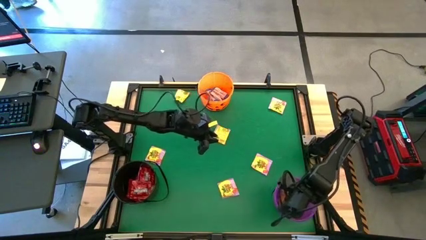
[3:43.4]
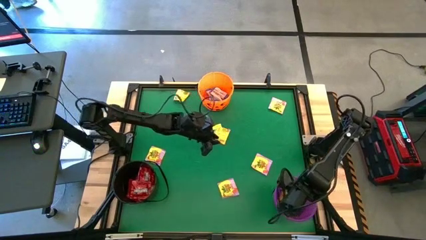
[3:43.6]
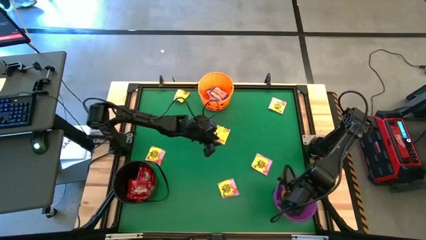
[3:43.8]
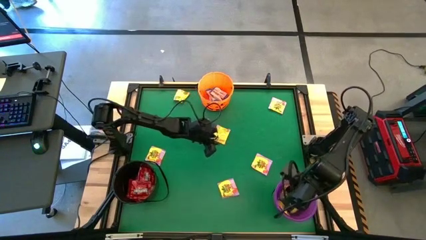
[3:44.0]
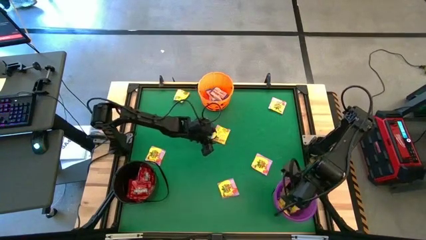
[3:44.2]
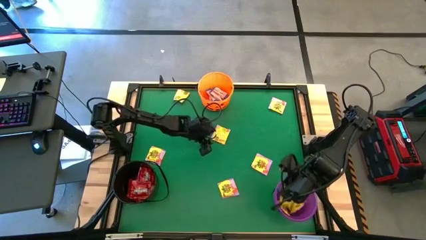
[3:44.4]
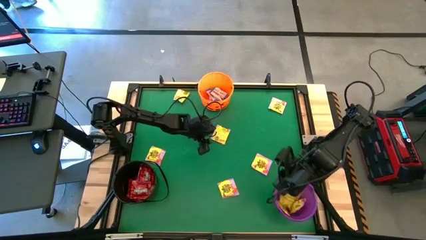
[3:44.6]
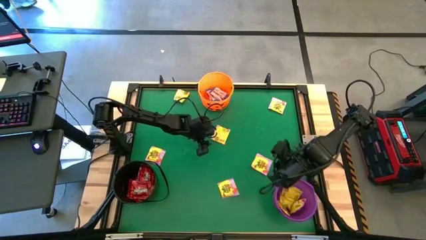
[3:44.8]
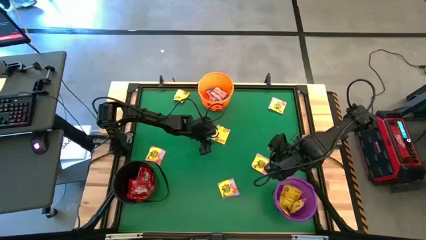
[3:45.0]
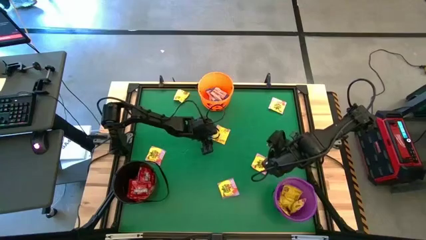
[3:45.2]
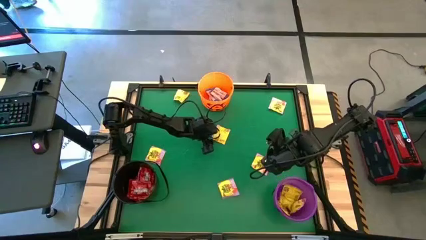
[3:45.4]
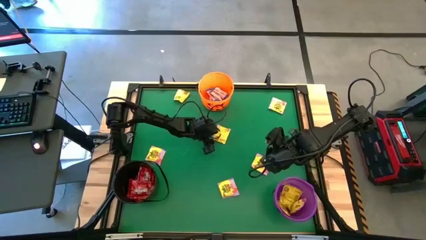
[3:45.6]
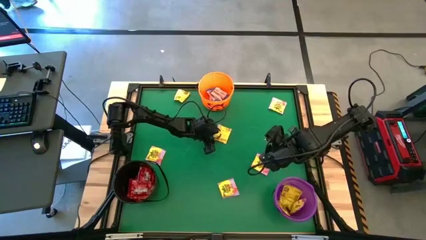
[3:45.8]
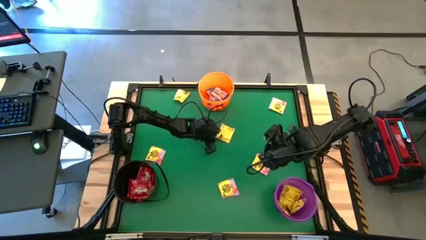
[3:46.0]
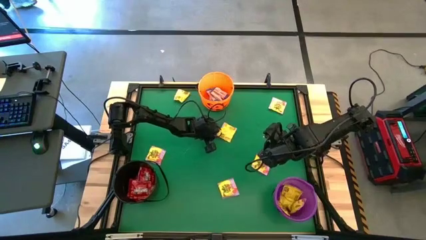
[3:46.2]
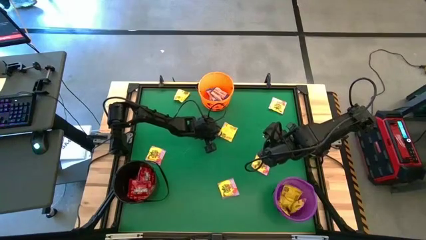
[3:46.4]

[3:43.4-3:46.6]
Task: Sort candy by brand, put in halloween buckets
Put the yellow candy into the purple bucket

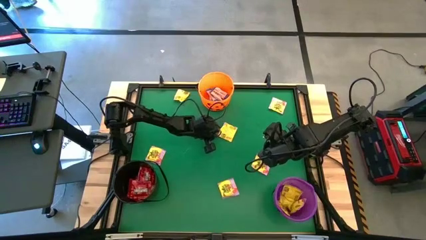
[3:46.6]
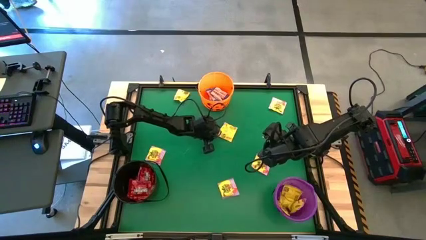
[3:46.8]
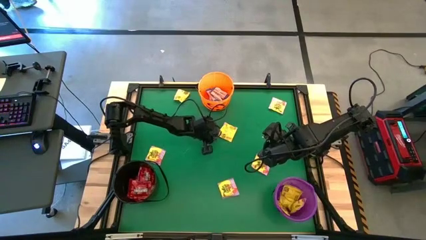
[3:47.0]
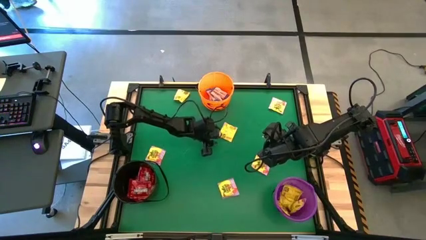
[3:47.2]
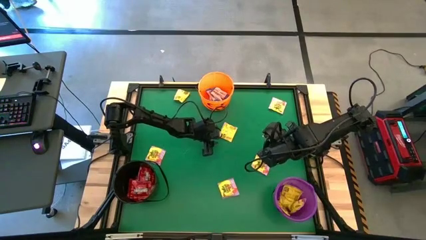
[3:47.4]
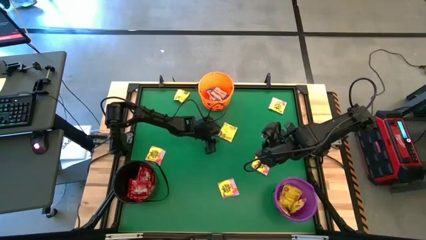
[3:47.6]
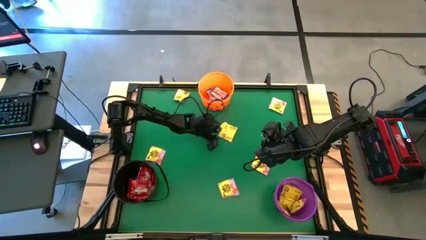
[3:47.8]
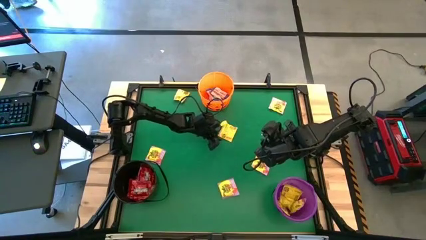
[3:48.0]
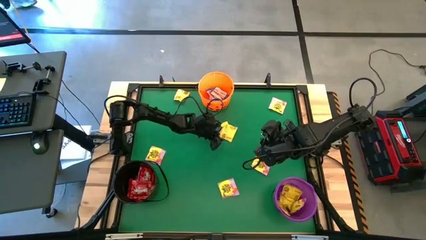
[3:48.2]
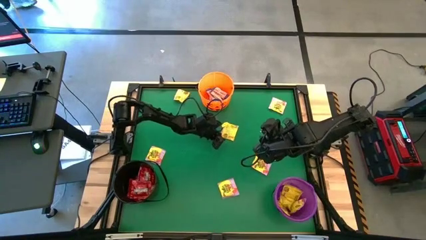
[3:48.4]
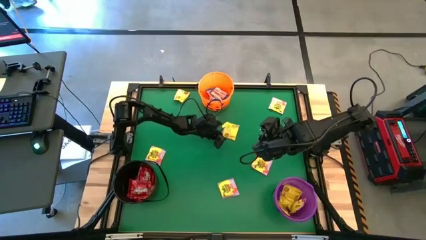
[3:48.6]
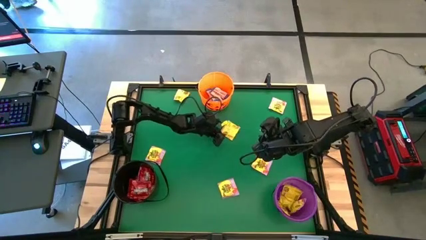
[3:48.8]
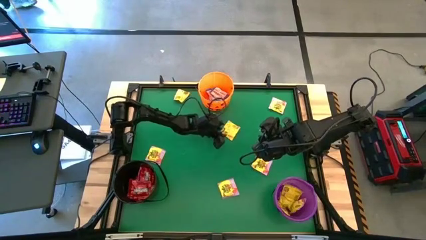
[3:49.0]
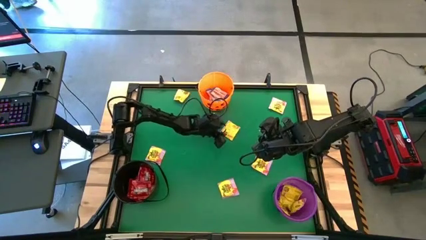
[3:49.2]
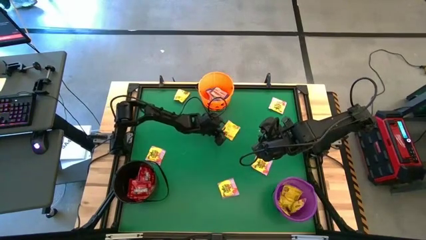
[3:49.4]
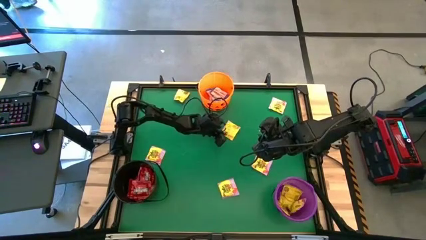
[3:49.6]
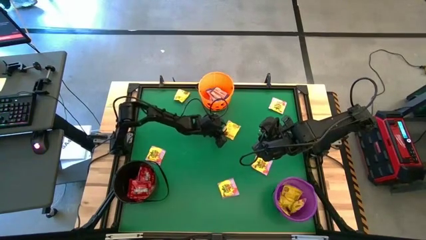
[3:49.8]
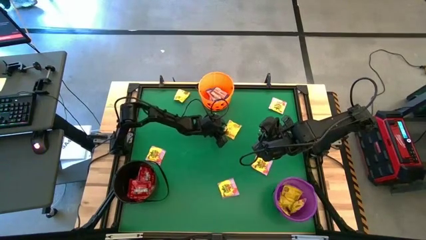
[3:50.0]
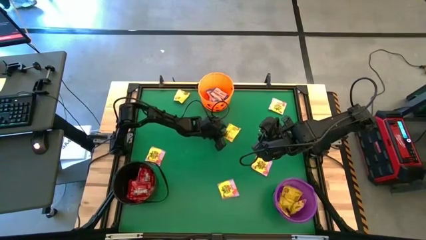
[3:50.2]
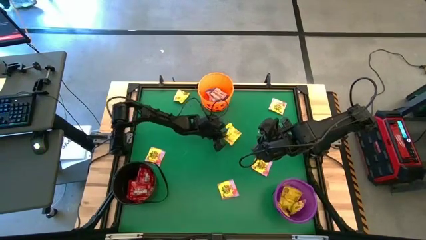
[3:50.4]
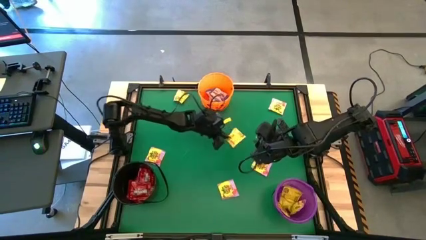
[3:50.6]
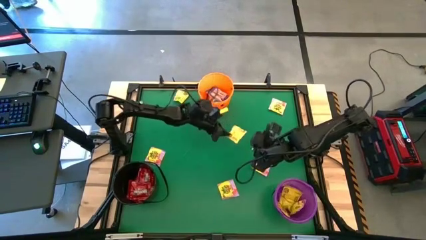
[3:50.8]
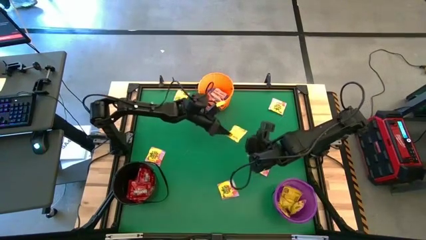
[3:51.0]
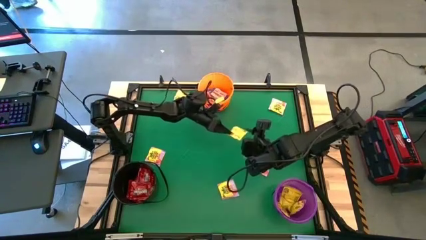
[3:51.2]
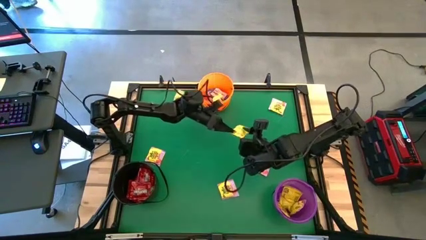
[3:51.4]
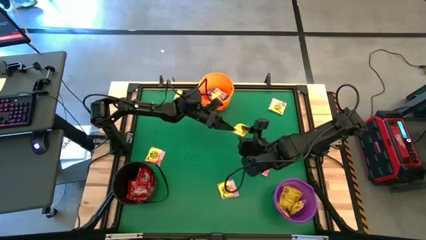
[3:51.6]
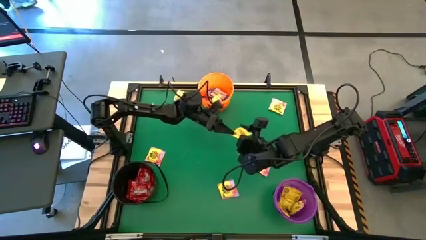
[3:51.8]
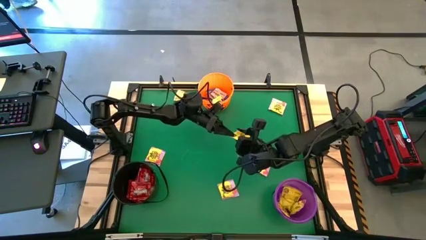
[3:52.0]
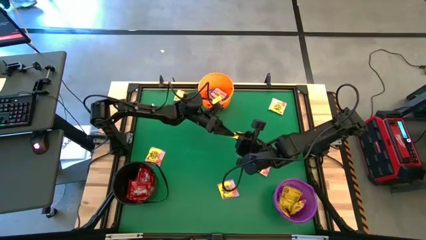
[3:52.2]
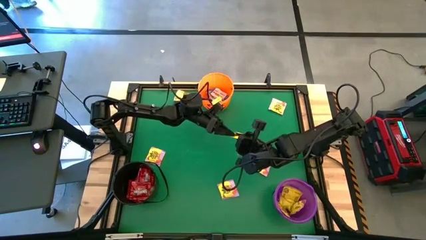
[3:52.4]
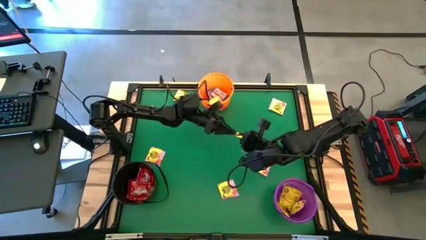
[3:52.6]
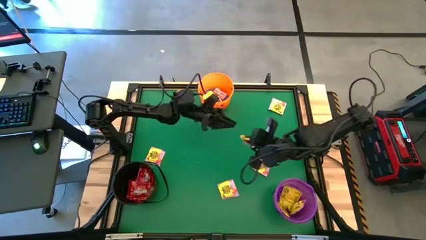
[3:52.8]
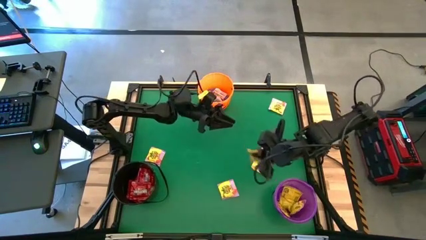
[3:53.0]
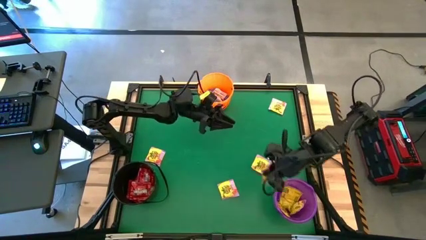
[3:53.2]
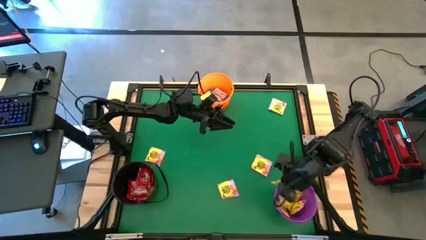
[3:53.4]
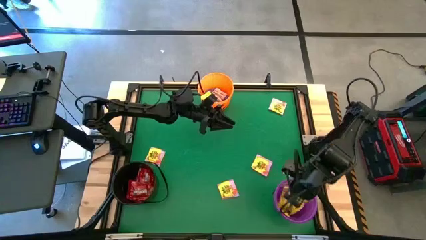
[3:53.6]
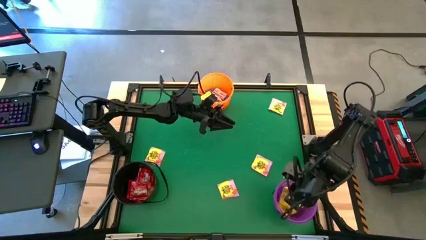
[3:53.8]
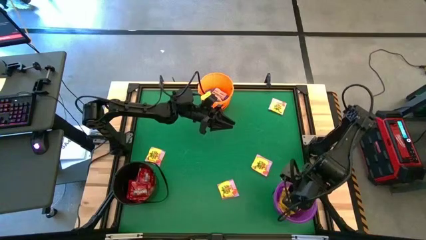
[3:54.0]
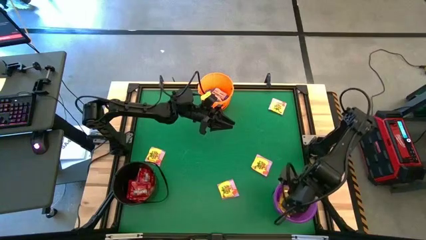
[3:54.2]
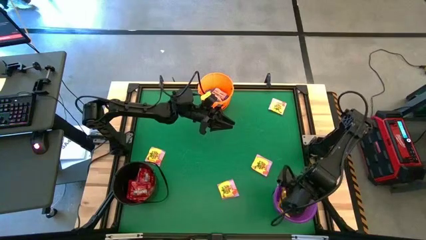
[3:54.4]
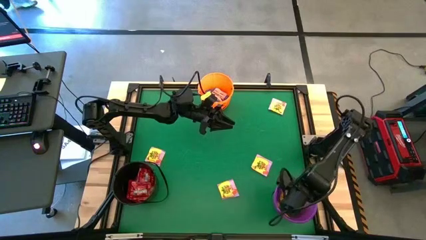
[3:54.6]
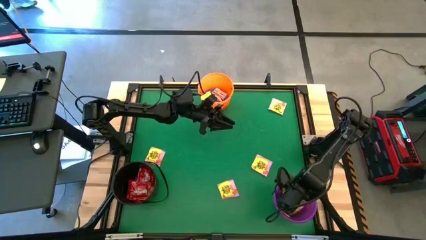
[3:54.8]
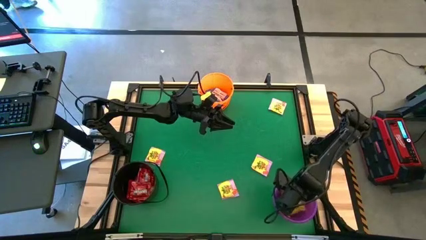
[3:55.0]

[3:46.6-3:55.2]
Put the yellow candy into the purple bucket

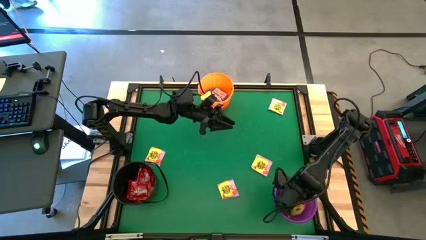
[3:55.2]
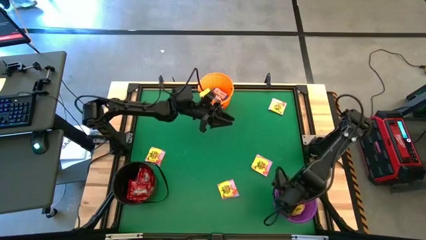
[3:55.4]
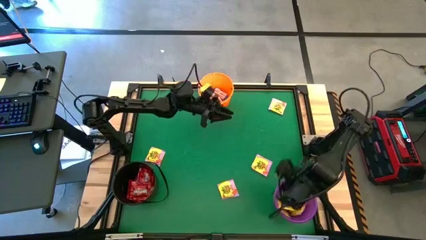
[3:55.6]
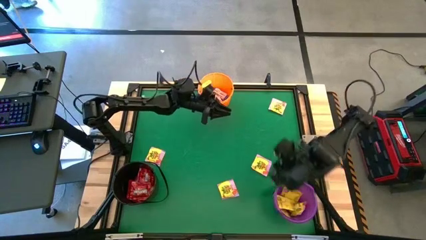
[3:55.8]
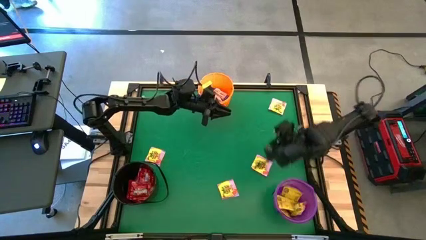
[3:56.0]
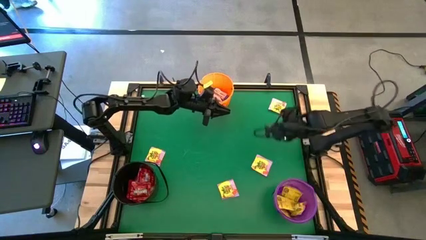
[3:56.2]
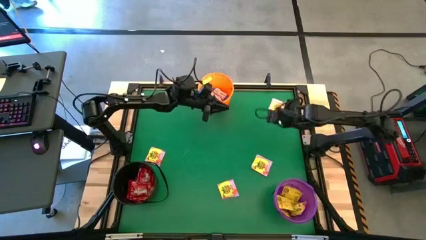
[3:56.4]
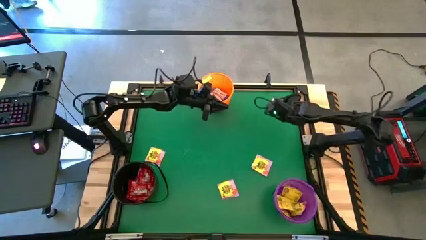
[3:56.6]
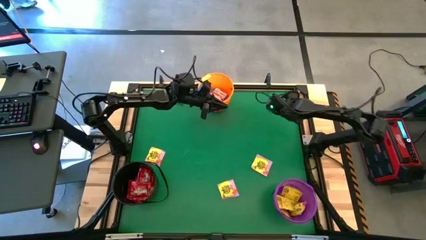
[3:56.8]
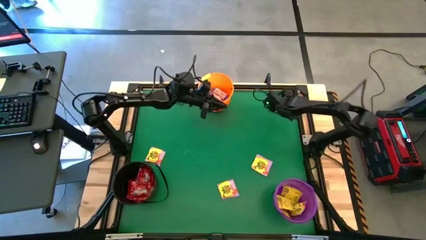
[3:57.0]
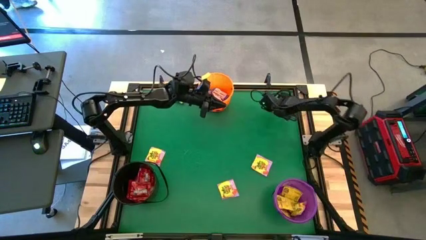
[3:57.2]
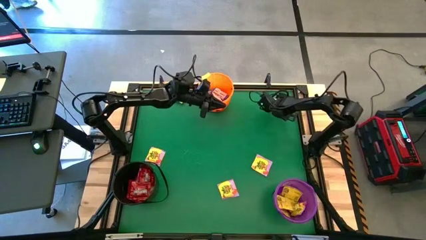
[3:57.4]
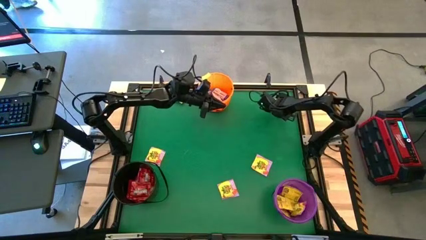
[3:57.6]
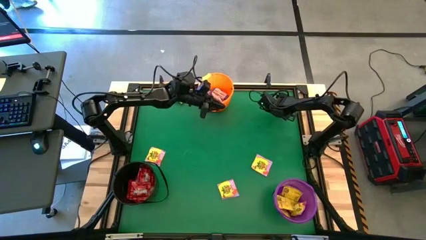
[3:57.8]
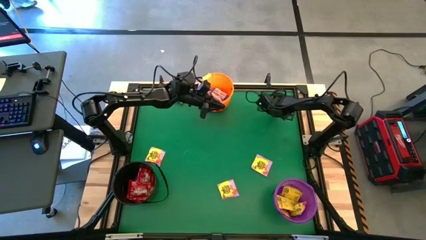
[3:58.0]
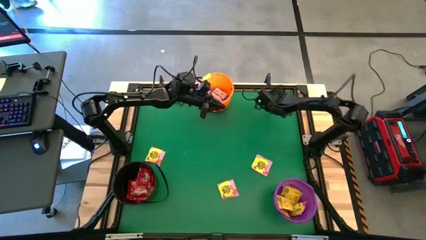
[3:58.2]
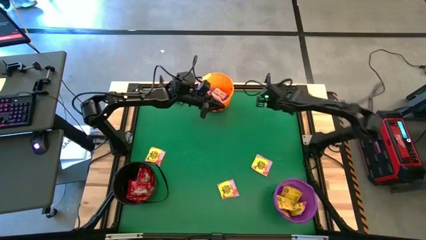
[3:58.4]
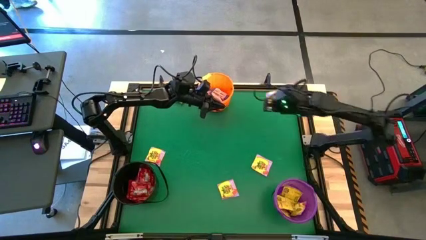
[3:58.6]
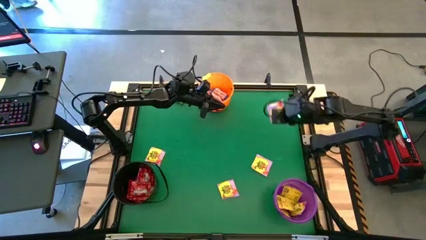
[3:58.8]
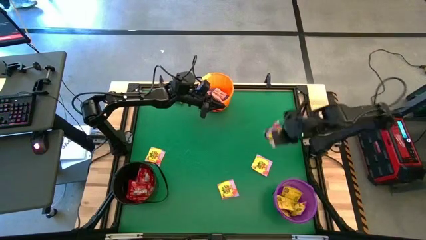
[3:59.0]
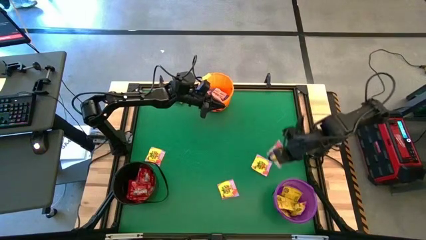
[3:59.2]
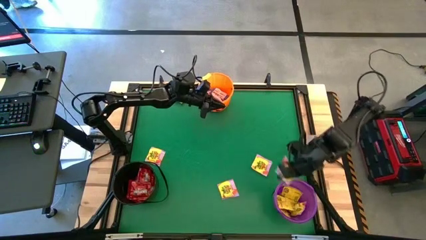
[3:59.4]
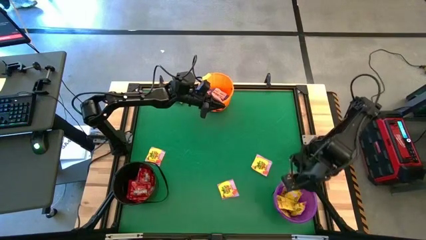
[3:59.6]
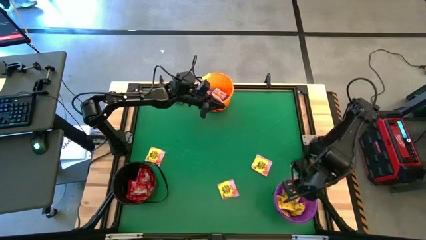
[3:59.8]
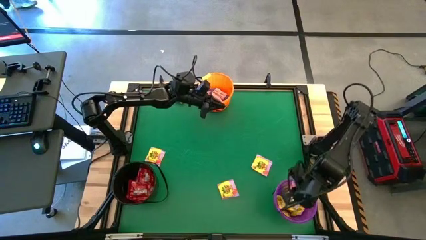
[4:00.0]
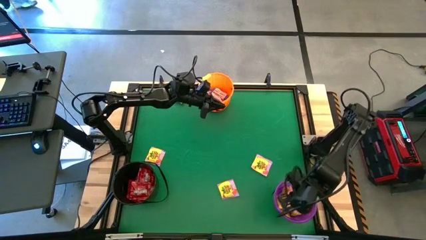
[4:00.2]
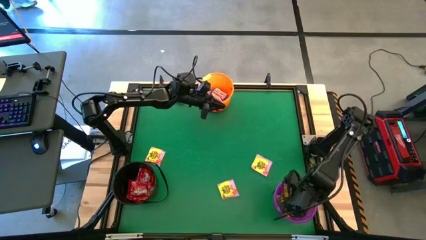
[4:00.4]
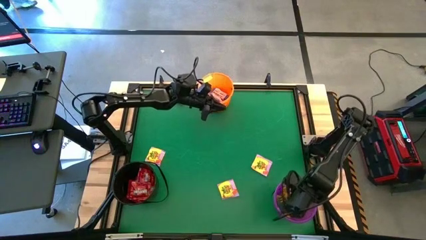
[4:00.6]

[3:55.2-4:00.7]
Put the yellow candy into the purple bucket
